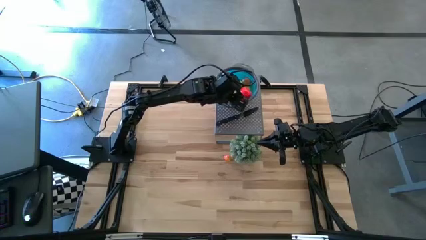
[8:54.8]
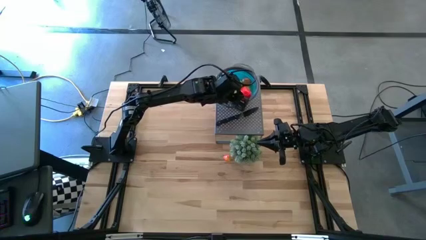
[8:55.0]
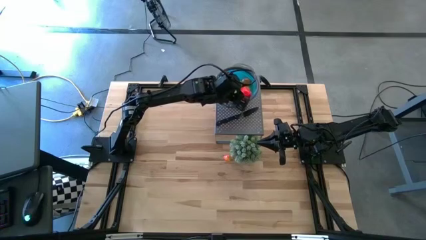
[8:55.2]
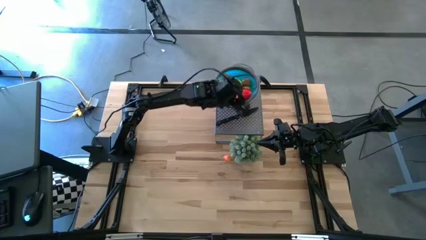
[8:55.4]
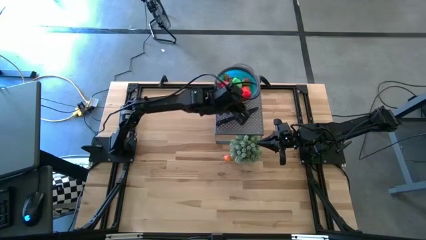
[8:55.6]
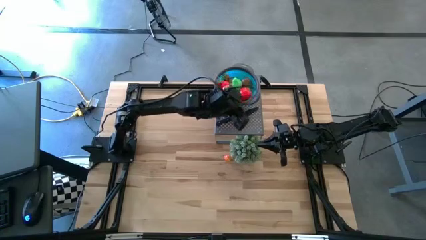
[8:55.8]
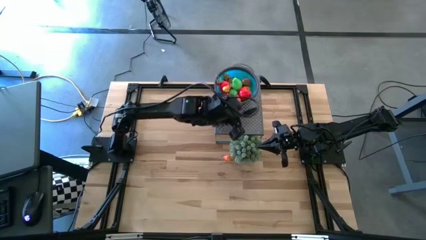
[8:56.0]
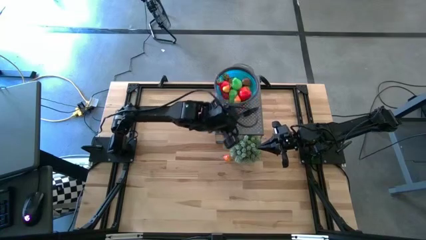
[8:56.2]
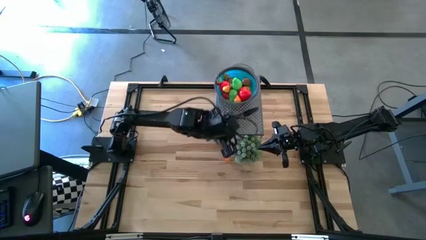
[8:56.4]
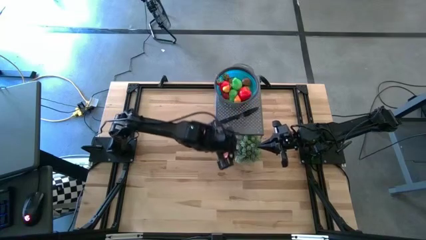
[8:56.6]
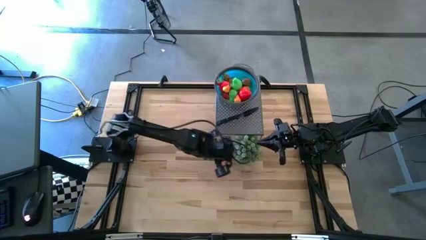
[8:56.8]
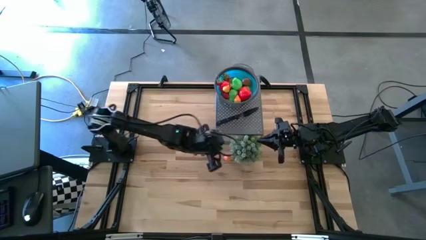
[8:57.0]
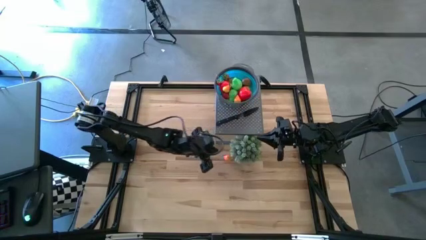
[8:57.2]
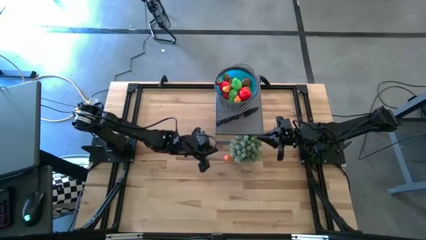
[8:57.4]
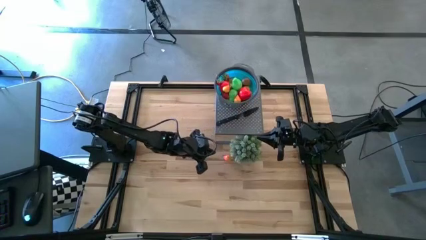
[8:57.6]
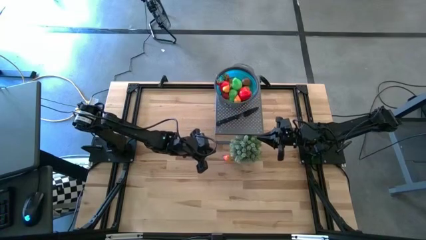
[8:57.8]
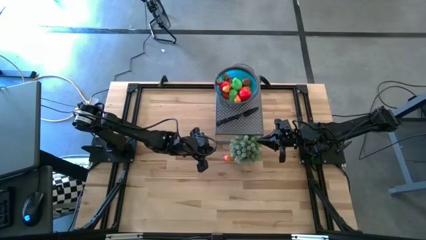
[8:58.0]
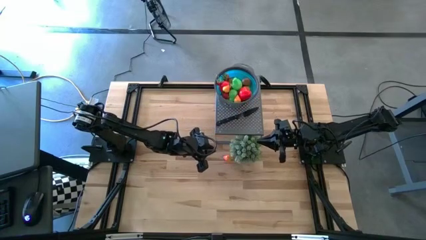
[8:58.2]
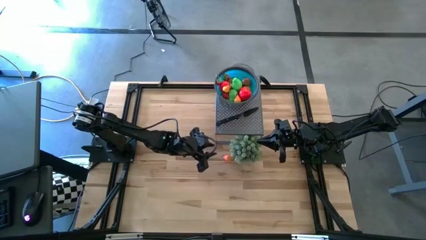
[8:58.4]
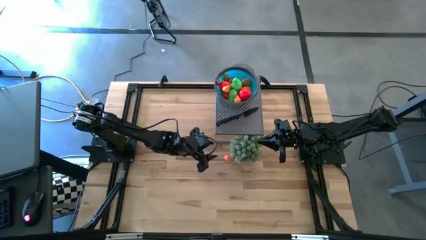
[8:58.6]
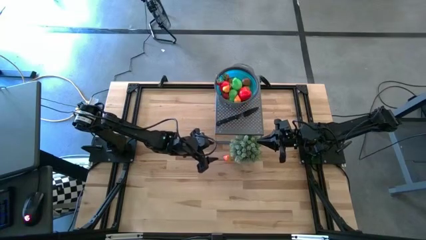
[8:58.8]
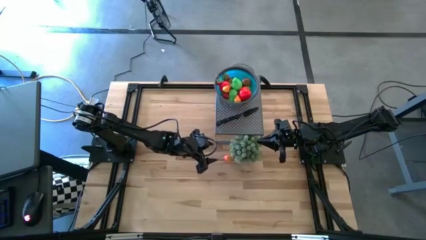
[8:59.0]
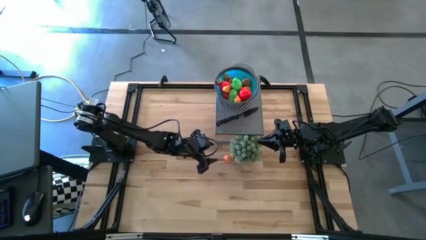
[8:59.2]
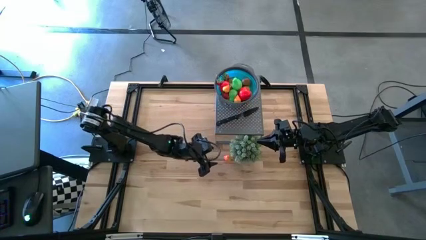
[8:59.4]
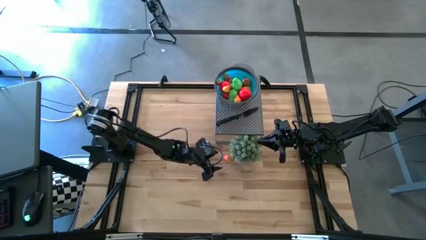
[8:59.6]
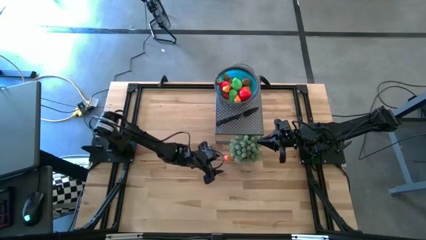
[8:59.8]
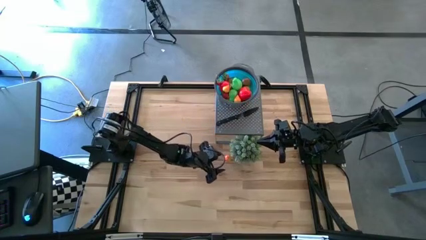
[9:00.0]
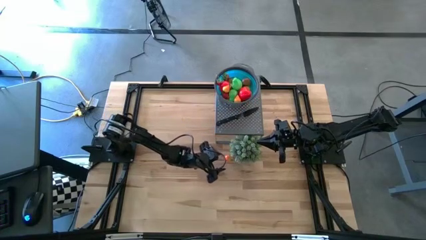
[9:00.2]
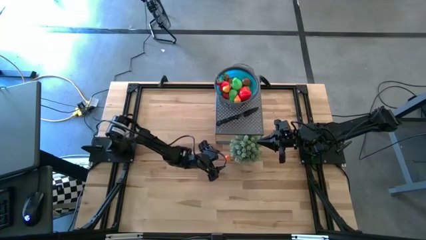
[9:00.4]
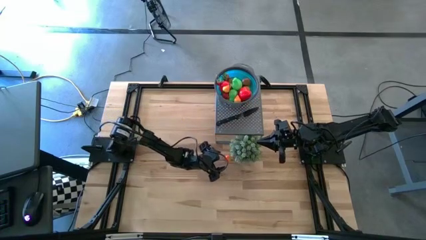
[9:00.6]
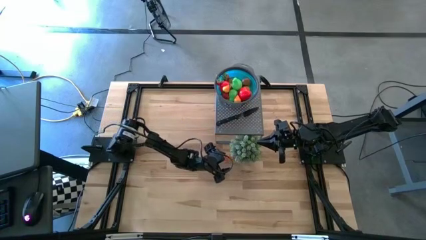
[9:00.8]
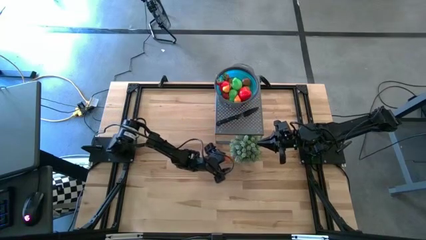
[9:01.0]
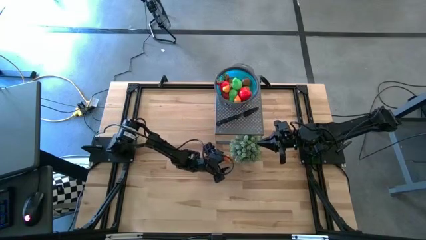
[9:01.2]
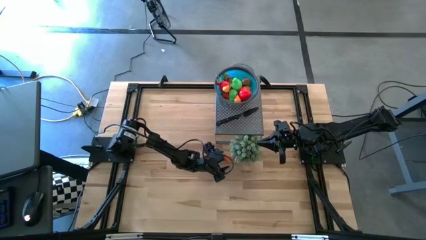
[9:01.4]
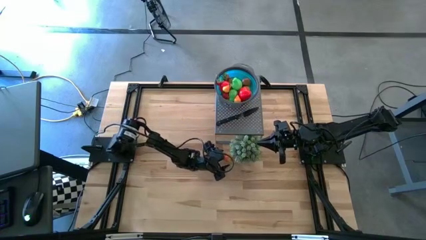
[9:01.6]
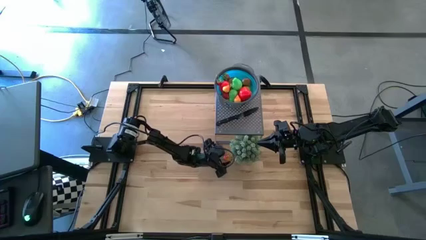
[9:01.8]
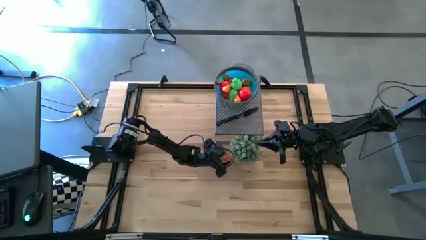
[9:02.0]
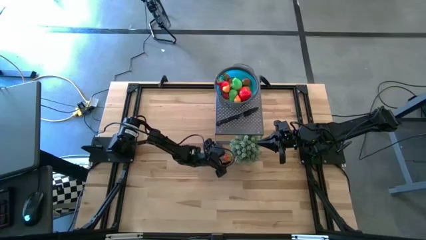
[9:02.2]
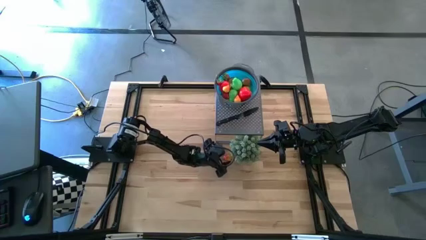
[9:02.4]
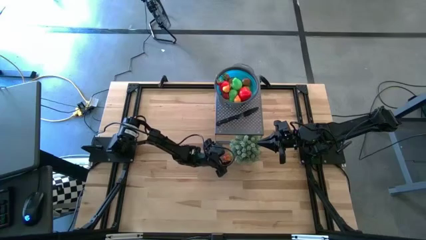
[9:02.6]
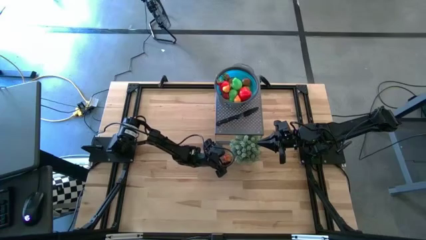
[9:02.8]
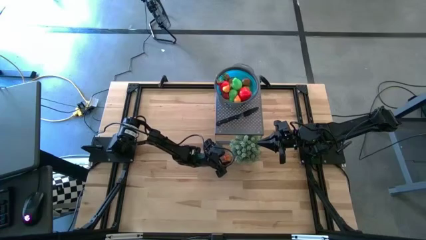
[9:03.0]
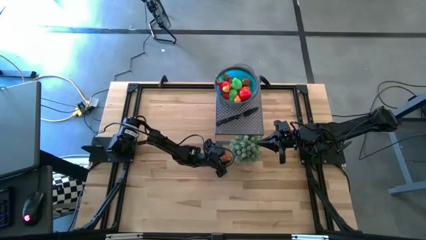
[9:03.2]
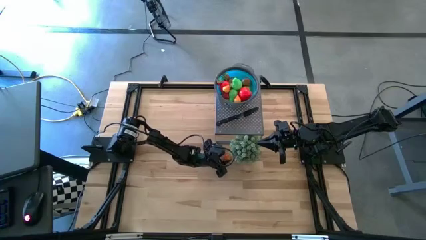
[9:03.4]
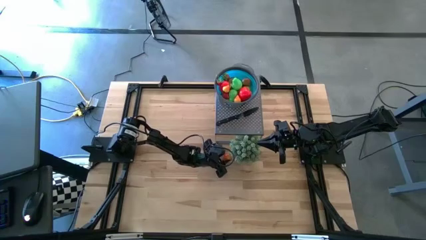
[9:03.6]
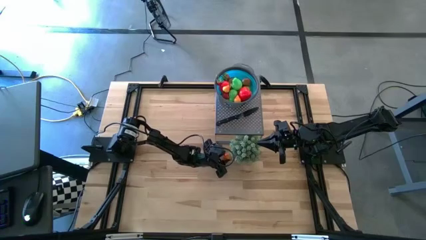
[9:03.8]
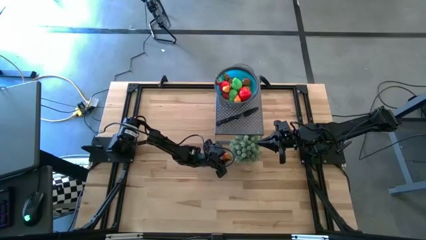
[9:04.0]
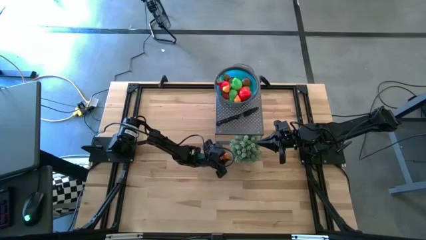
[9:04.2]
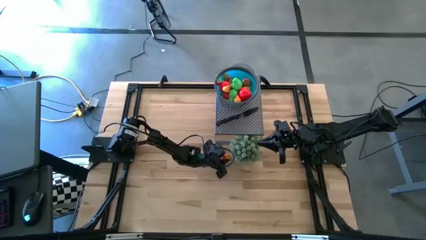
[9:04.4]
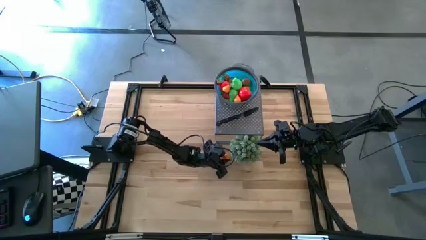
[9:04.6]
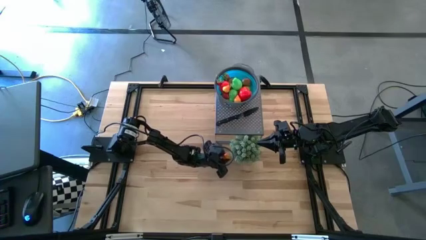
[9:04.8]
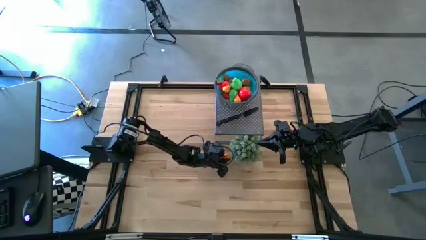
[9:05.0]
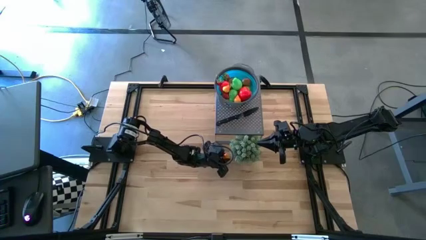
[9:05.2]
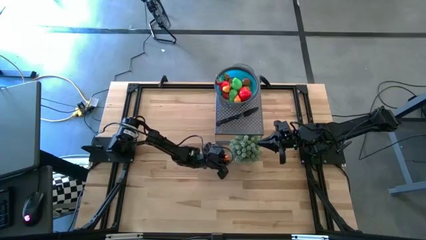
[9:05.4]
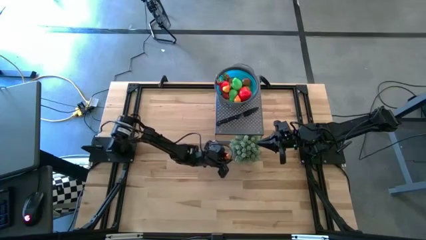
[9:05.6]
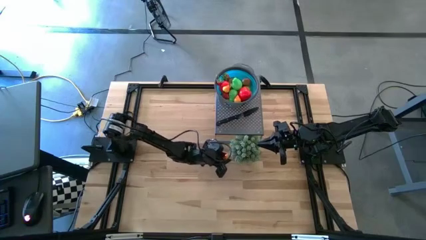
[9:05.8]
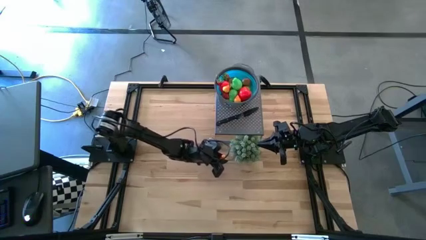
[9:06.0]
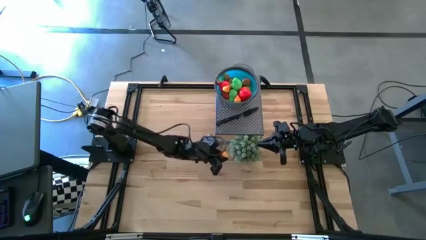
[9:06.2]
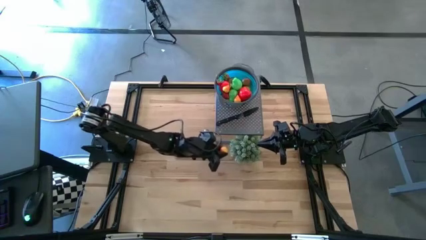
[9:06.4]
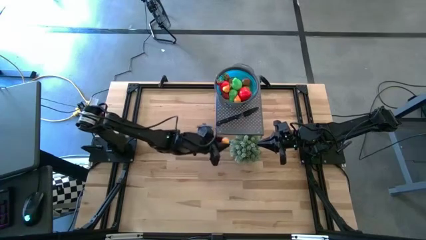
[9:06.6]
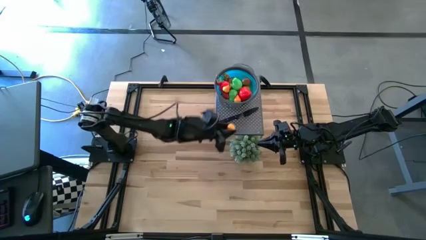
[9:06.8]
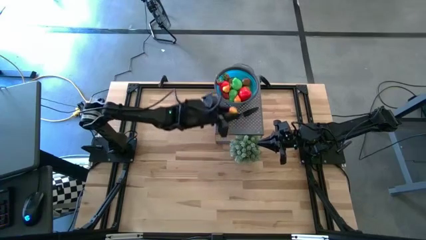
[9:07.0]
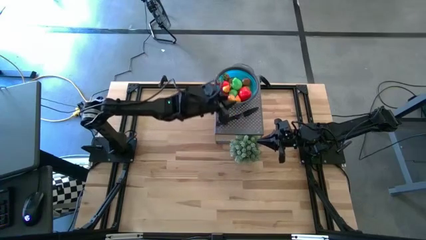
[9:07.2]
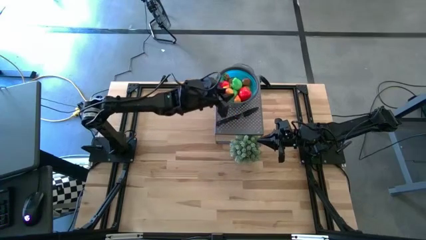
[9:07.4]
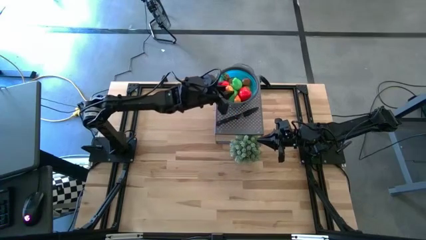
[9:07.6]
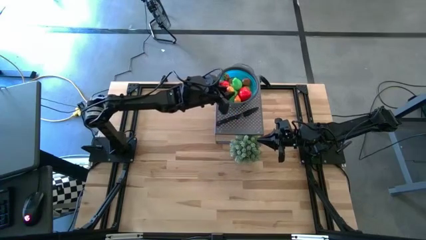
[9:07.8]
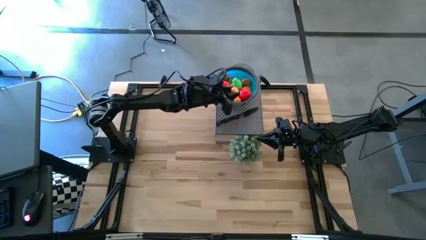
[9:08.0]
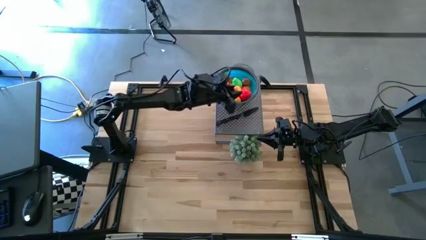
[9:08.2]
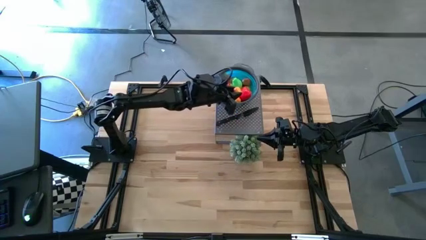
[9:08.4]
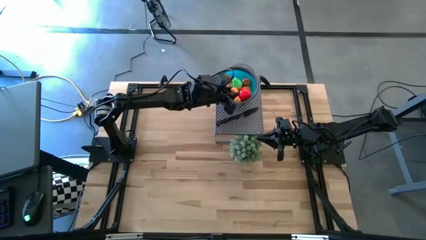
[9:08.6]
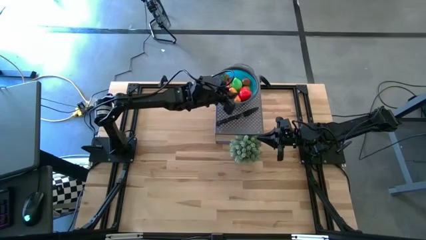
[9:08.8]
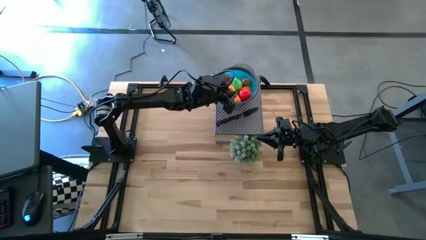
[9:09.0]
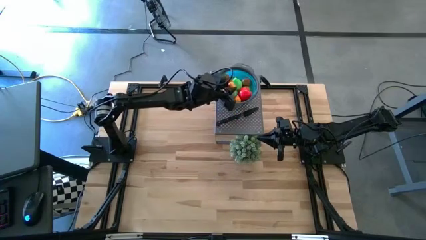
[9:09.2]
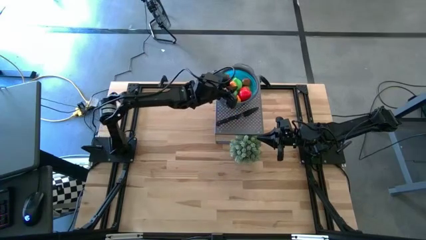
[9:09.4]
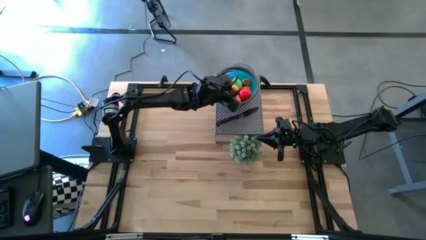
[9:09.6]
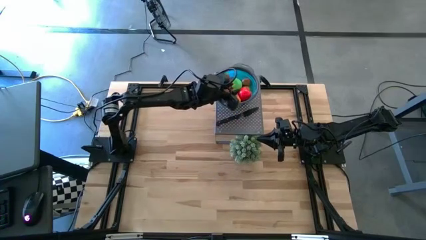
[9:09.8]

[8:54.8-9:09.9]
Task: Pick & Place Fruit
Put the orange pear into the blue strainer bowl

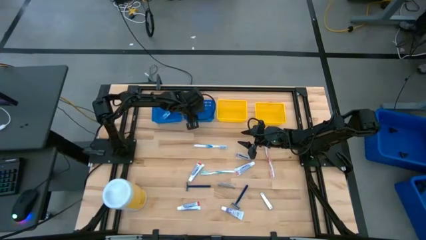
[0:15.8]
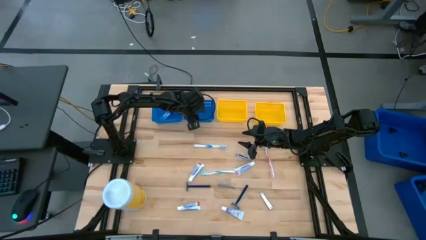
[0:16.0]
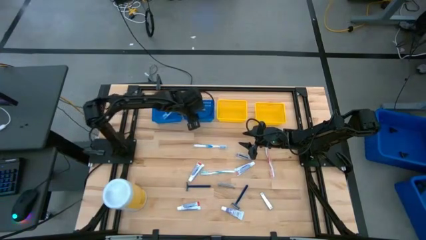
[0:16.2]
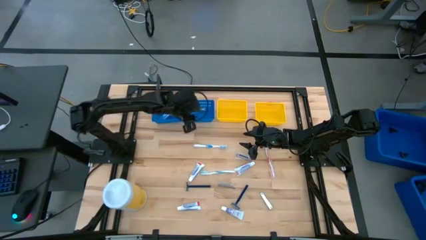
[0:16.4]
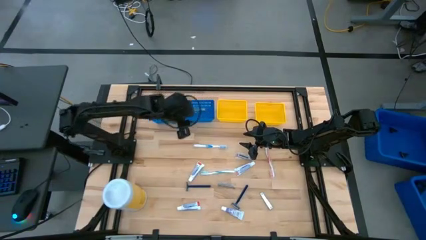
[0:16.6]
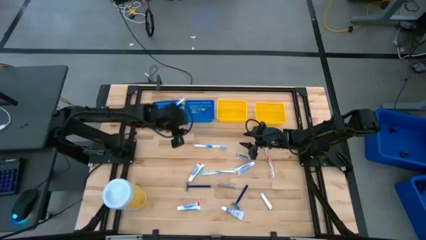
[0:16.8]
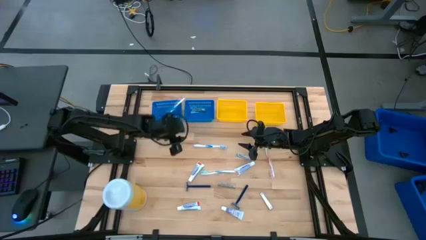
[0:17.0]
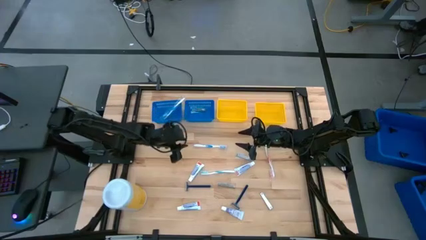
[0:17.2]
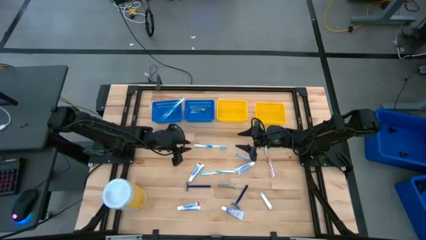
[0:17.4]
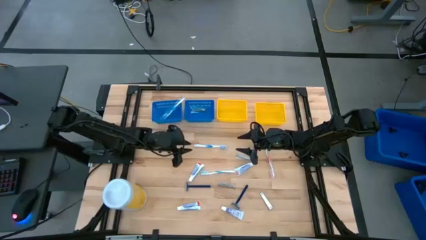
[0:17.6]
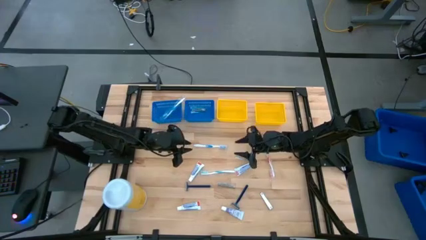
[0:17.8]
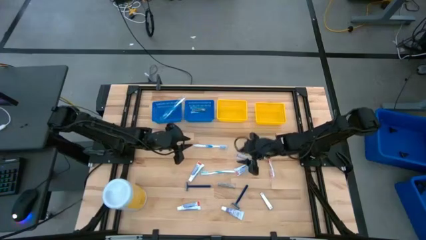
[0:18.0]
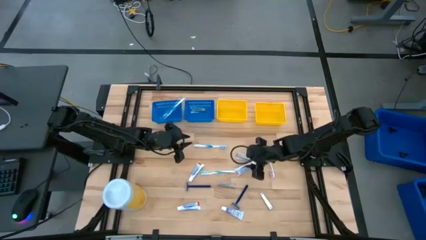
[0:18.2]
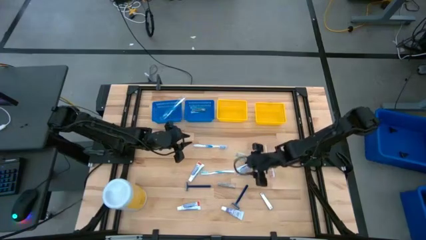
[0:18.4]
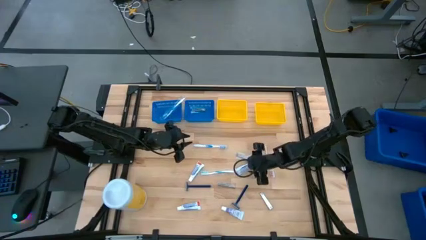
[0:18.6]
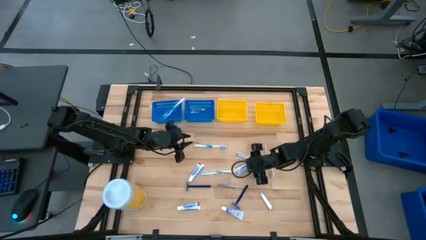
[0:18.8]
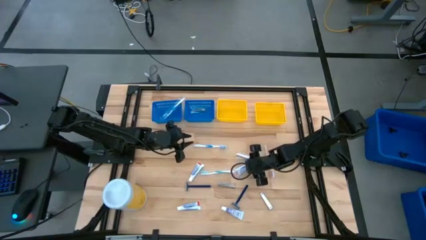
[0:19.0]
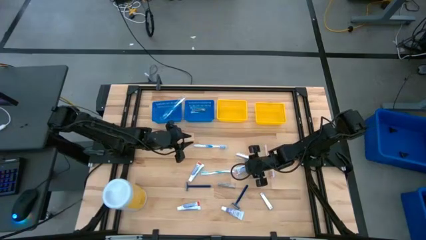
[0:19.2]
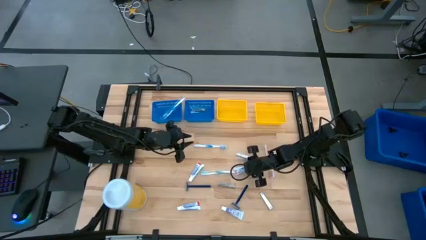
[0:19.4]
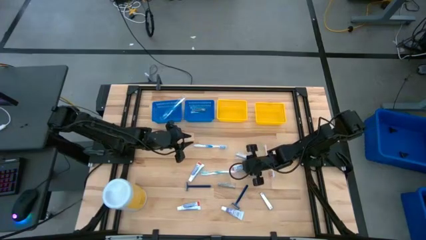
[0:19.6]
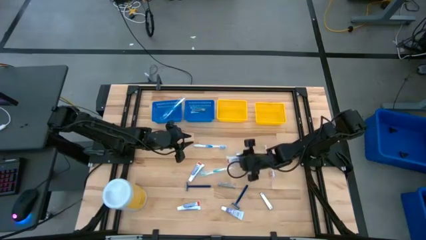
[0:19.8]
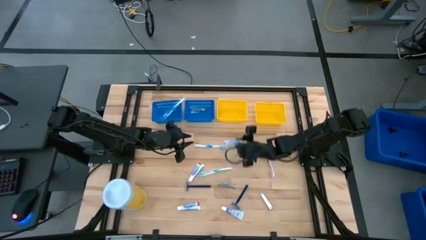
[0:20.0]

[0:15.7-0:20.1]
Task: Pick & Place Travel size toiletries
Put the white toothpaste into the left yellow bin
